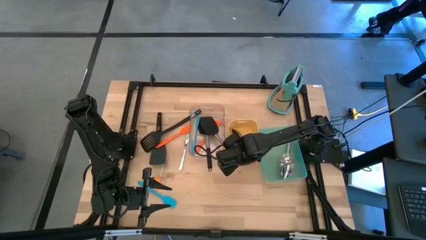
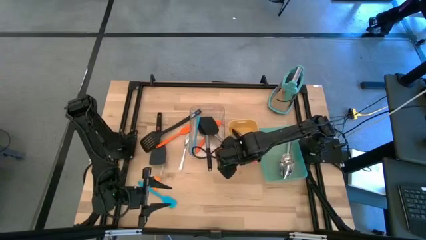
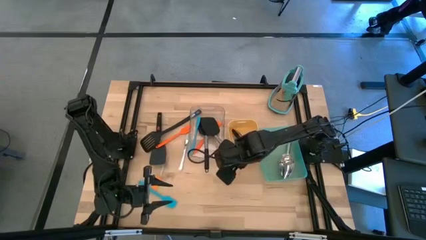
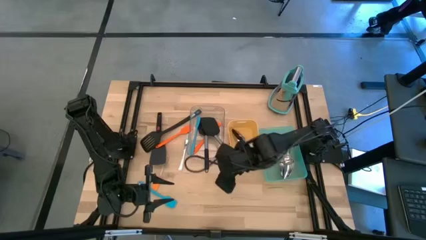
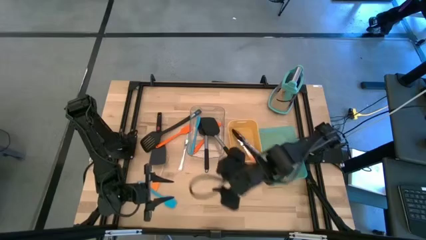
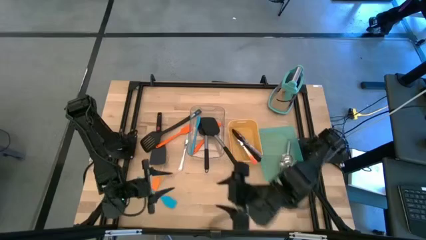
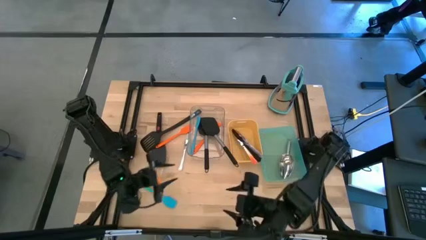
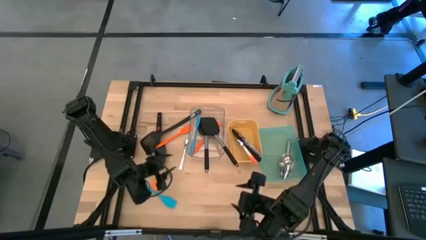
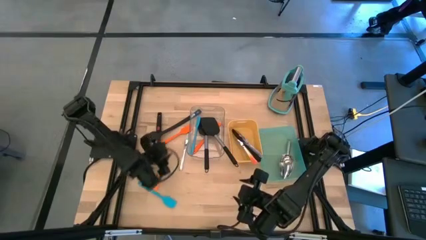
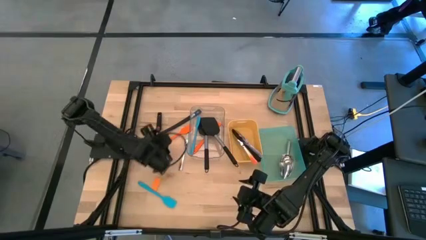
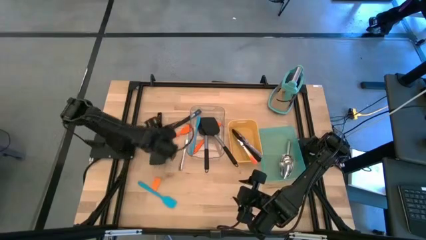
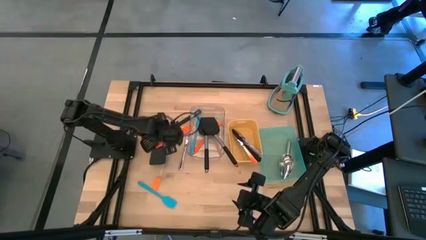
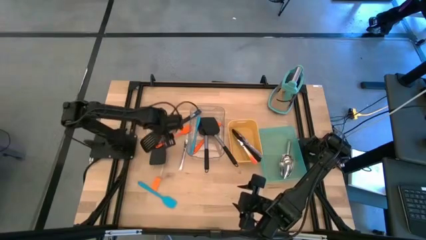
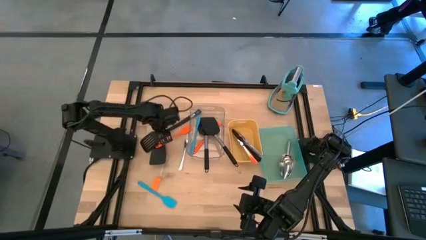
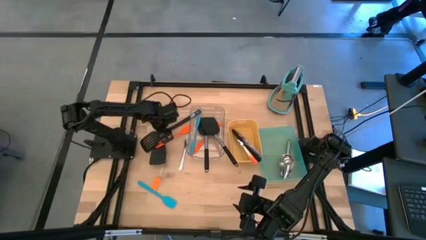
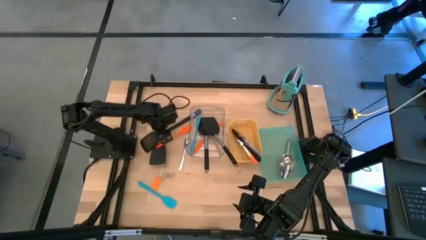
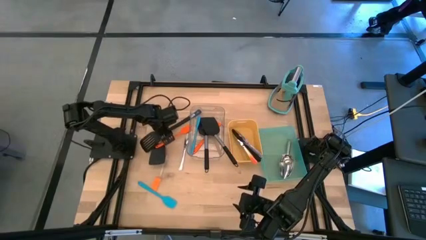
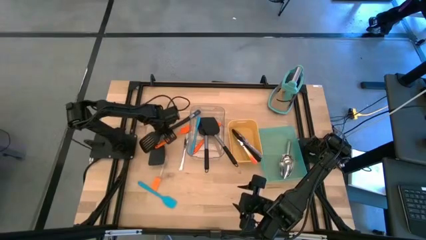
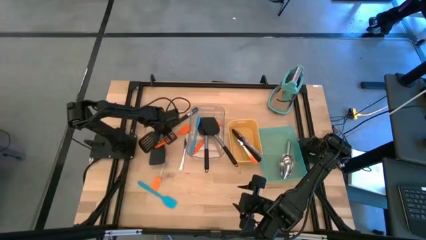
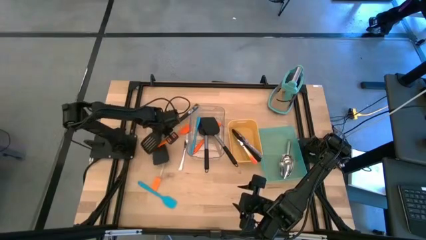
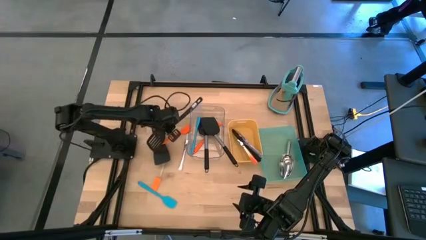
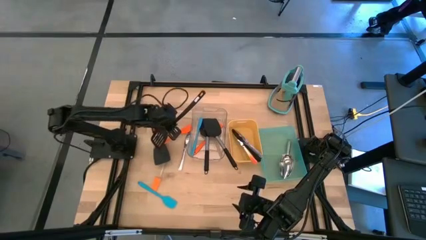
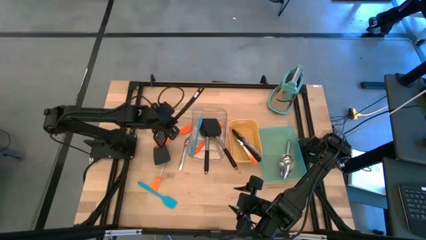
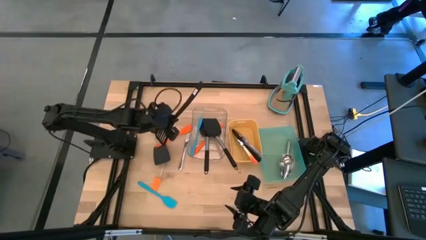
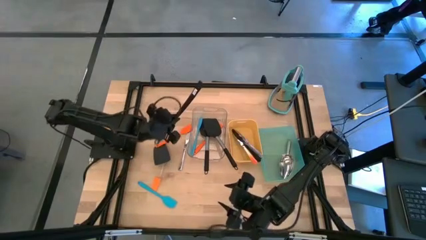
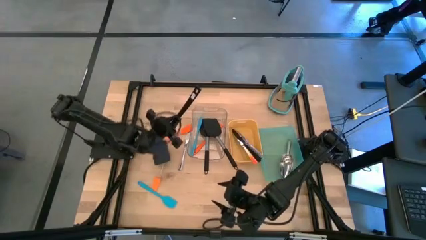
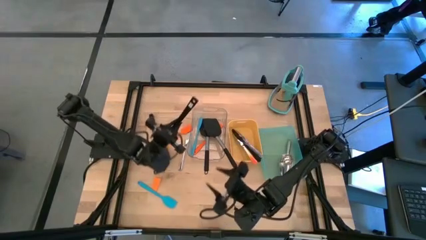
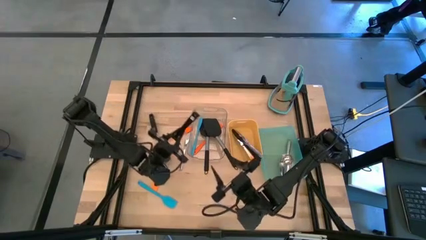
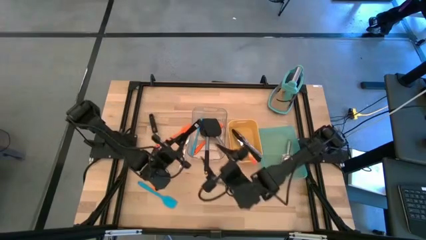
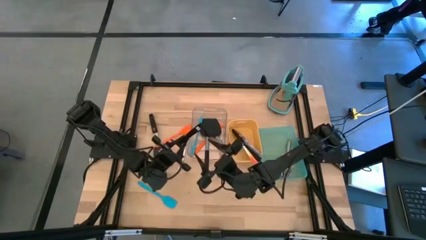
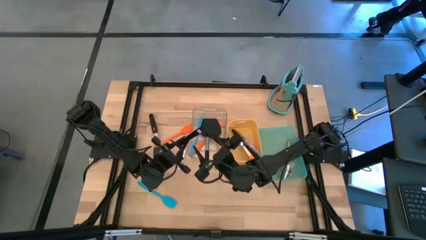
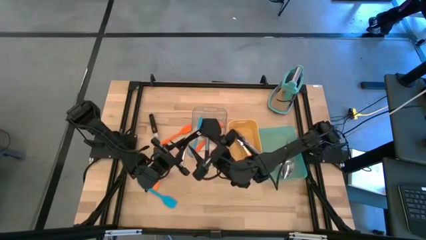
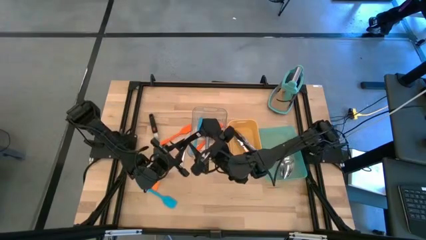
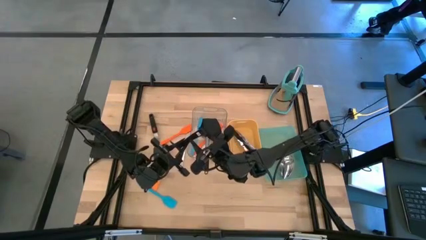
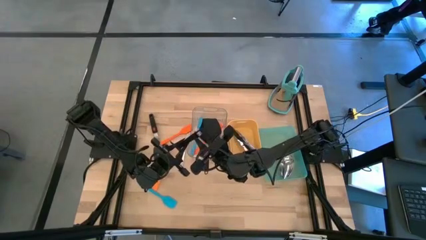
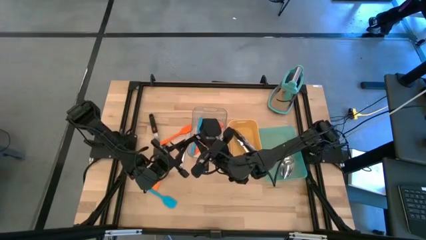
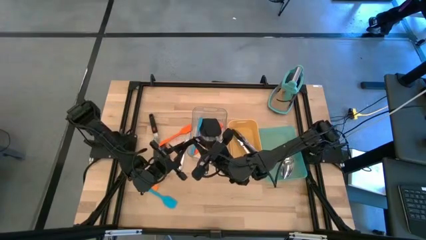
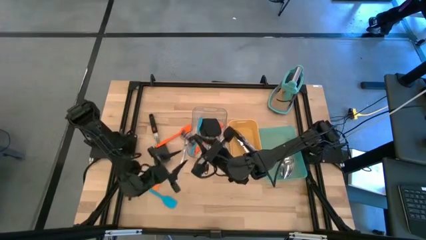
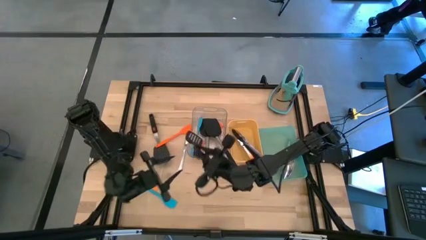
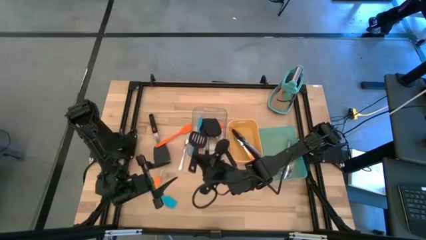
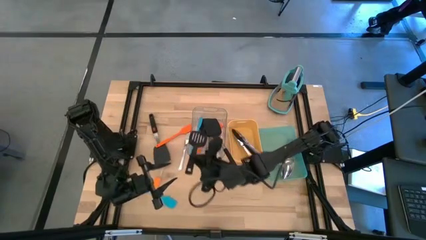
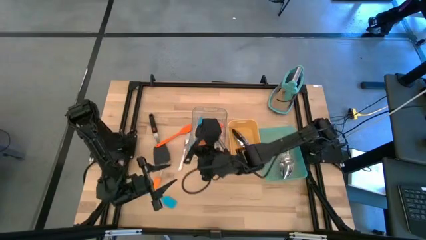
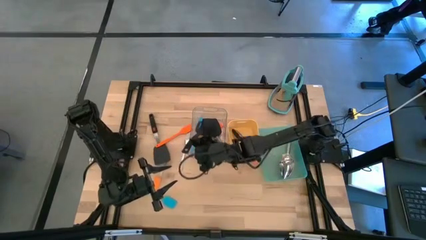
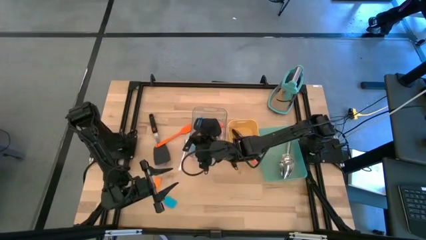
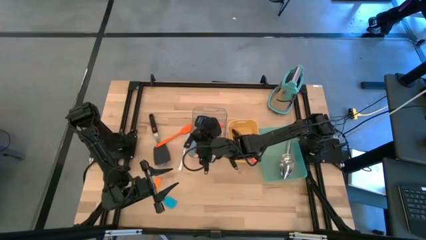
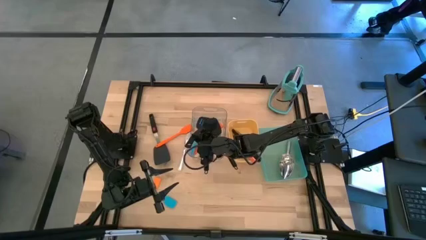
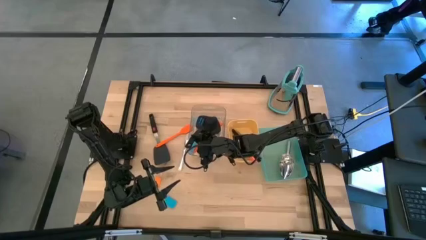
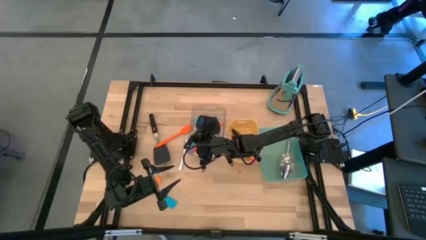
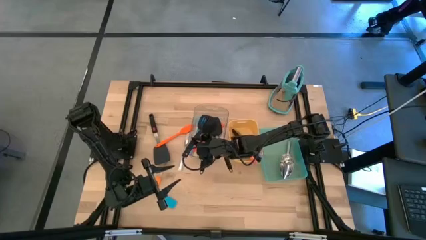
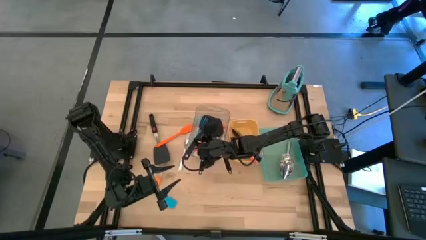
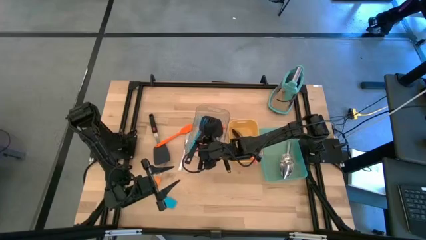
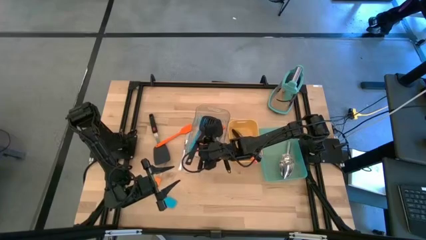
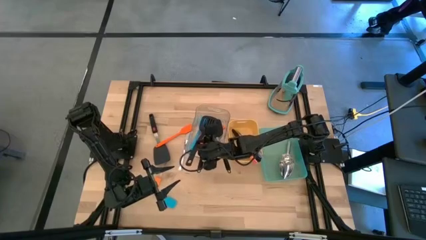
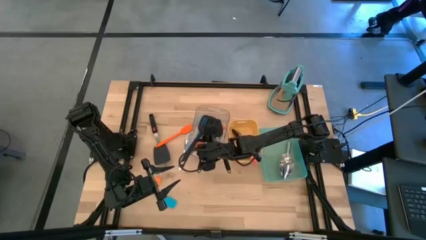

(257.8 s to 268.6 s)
Task: Pick & Place Kitchen Items
Put the black spatula into the transparent bin
